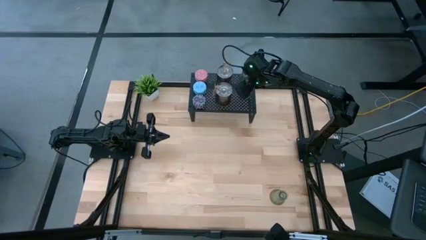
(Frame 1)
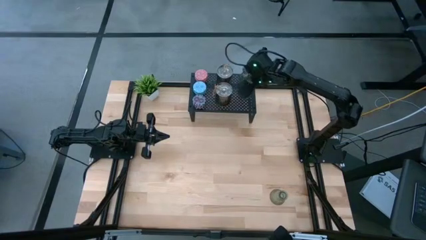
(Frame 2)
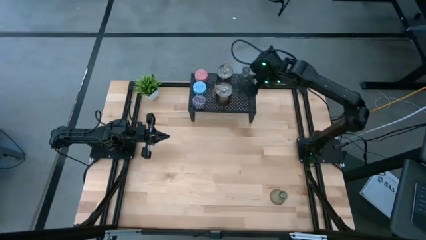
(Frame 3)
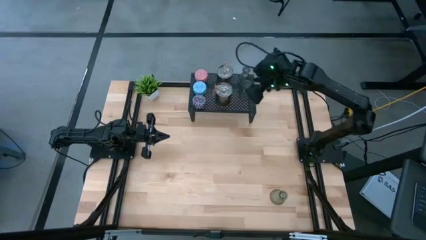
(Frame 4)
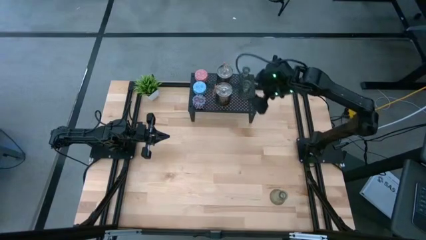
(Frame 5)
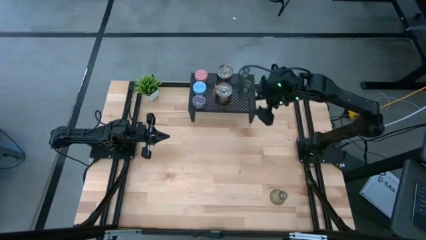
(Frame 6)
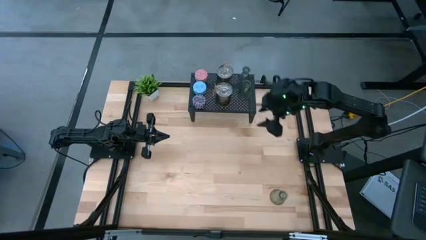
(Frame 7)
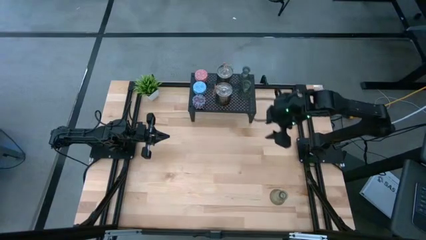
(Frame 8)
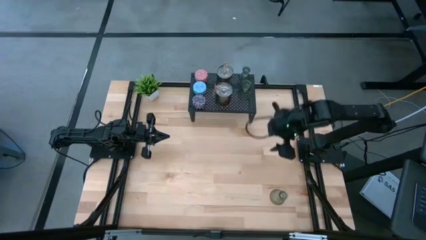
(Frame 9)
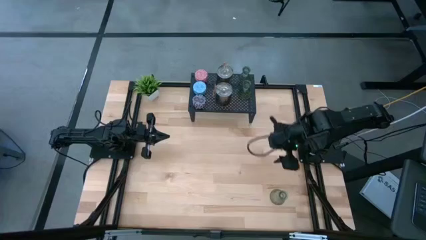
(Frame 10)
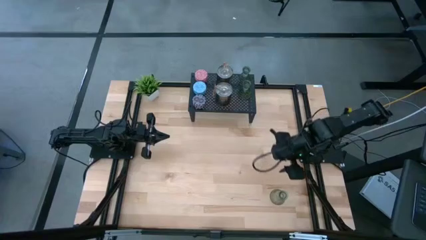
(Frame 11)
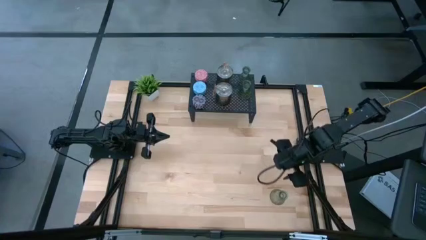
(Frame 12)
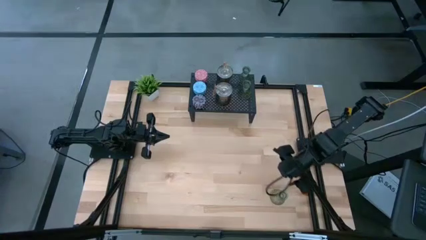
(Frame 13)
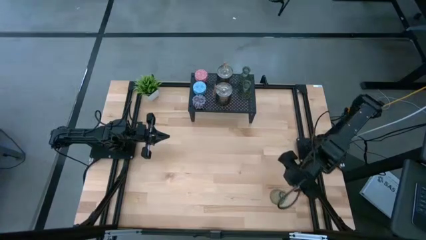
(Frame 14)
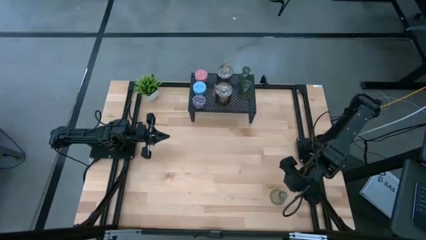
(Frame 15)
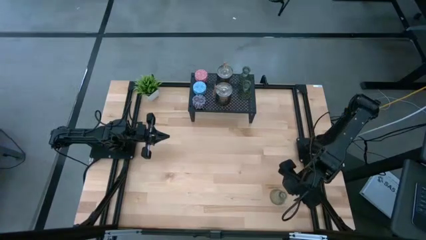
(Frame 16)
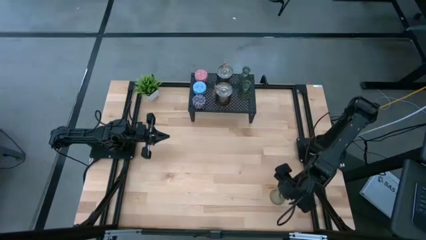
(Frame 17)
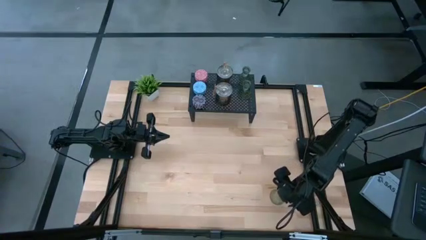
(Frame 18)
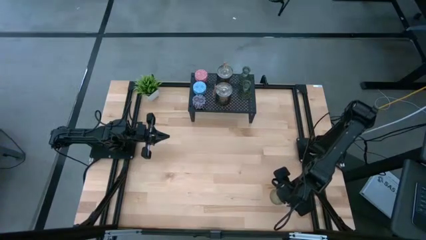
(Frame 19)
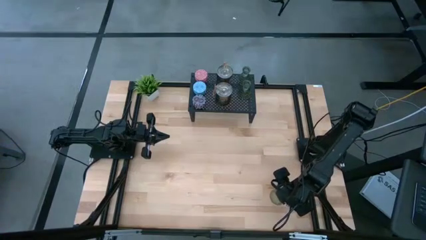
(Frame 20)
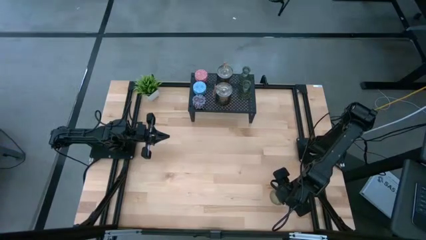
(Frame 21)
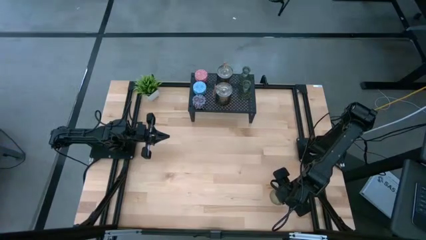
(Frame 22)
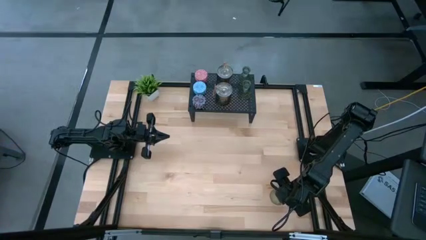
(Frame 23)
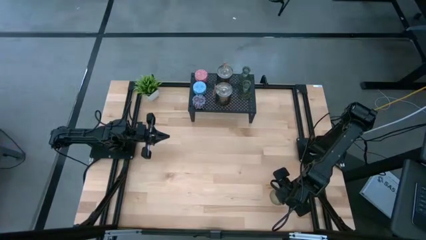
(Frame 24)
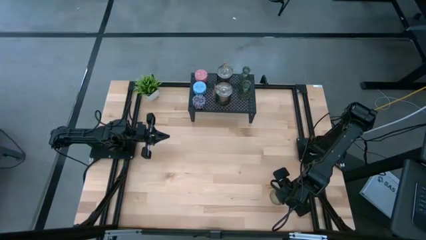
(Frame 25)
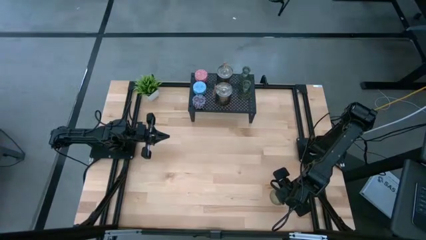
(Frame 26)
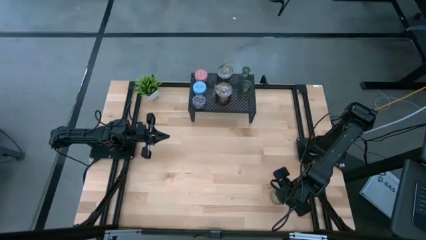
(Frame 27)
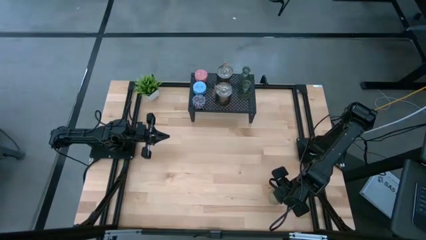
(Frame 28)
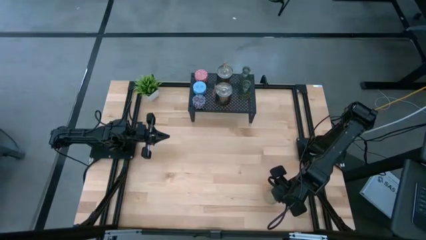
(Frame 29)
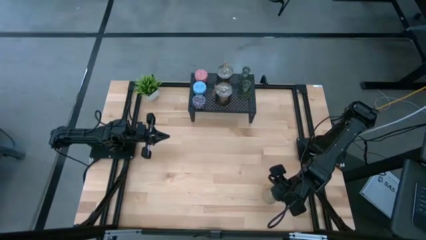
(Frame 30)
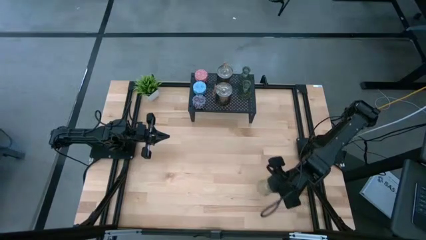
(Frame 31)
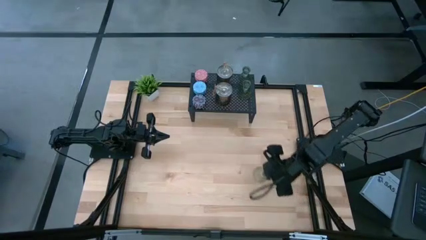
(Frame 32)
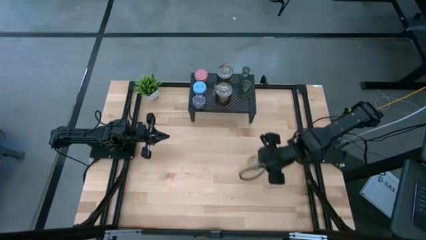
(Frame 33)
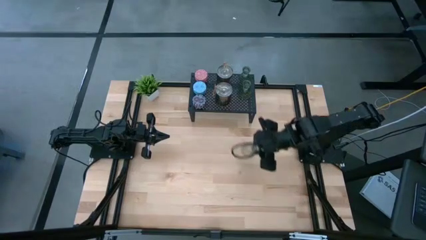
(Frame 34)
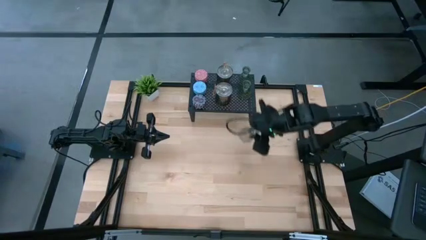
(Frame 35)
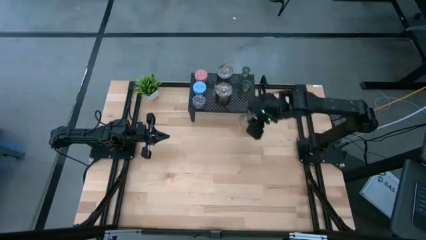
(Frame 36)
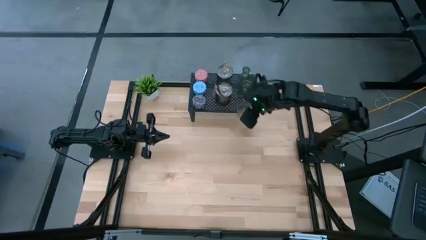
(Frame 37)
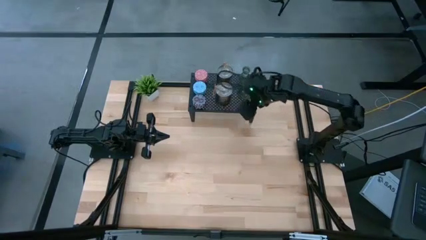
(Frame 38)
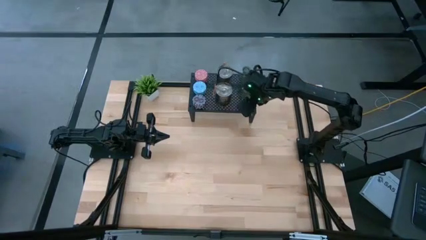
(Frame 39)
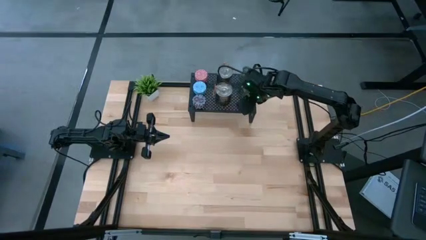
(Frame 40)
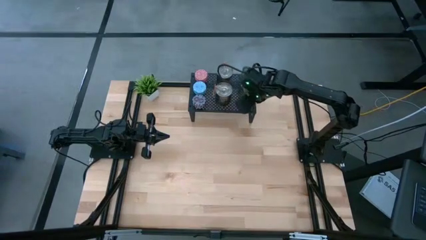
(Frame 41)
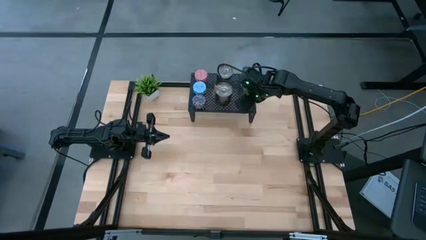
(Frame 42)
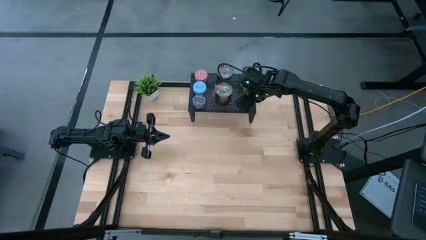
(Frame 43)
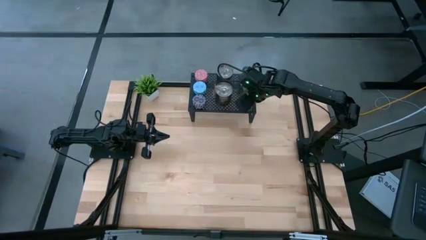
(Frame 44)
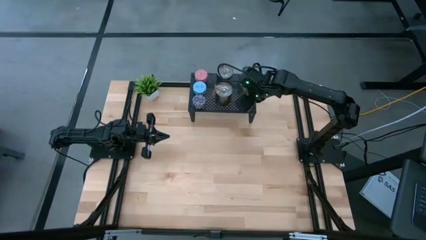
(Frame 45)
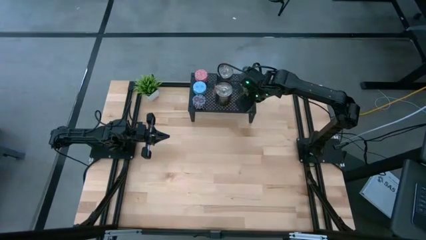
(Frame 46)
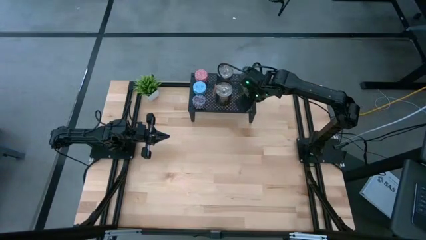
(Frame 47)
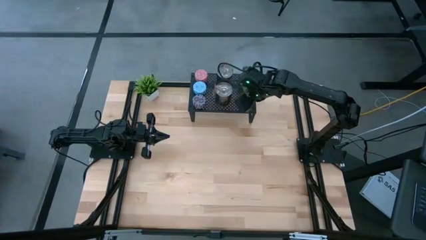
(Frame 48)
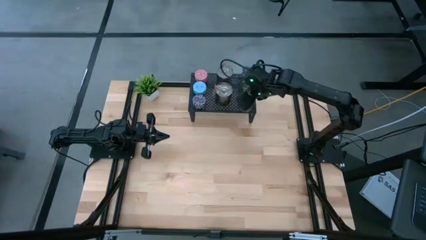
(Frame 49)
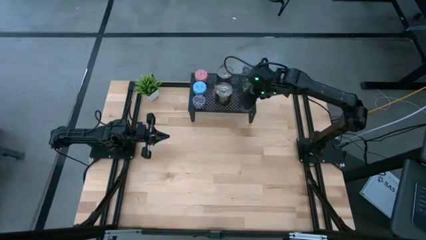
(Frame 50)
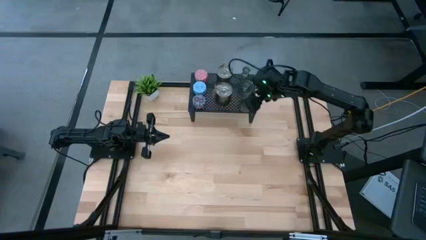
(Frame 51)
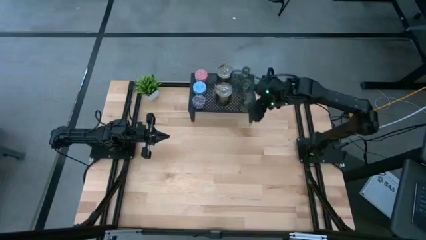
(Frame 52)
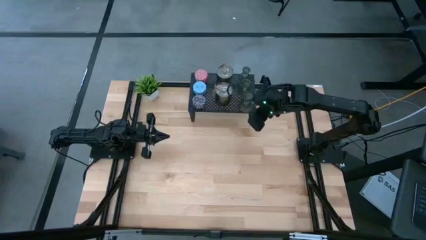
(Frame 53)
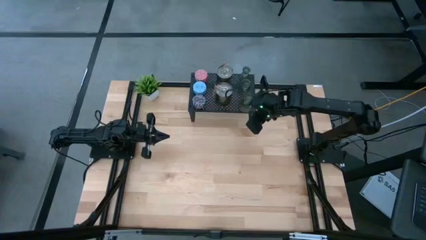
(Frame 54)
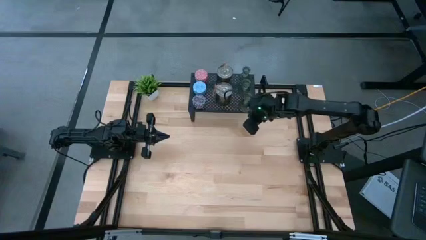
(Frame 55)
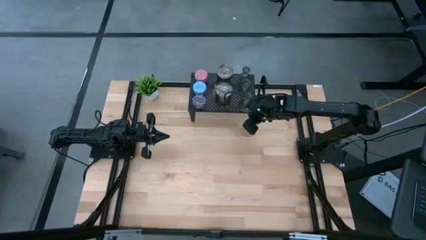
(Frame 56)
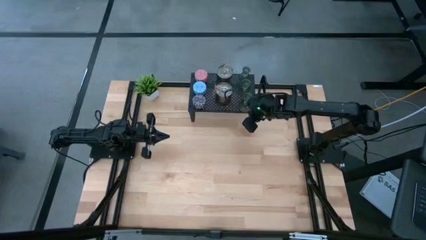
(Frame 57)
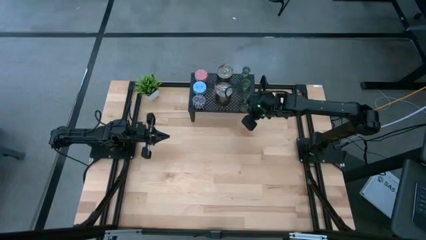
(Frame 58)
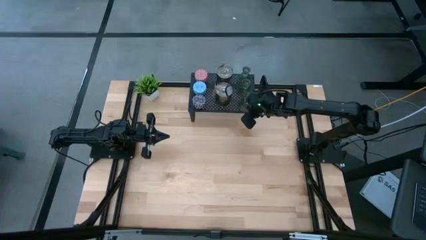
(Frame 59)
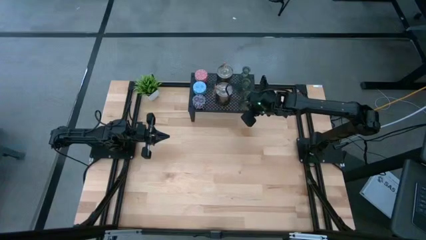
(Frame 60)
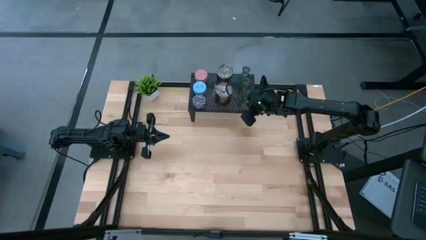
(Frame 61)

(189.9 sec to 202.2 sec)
Task: Pick & Place candle stick holders
Put the green candle holder on the shelf

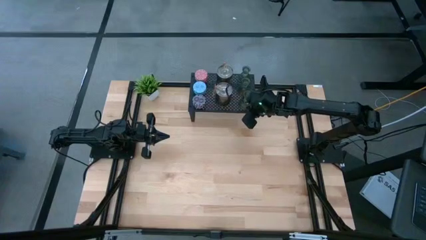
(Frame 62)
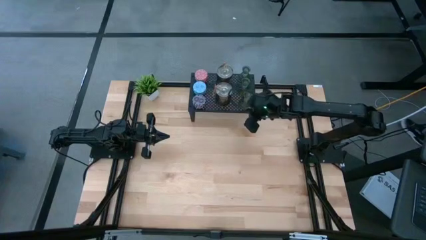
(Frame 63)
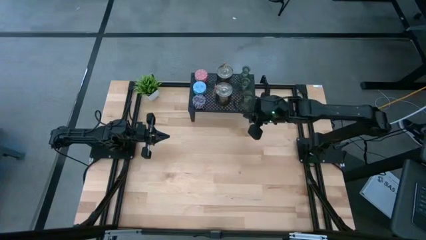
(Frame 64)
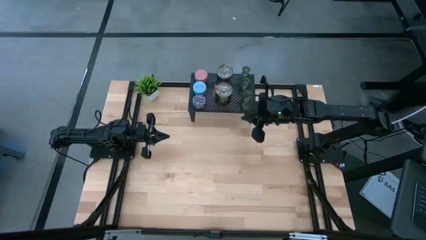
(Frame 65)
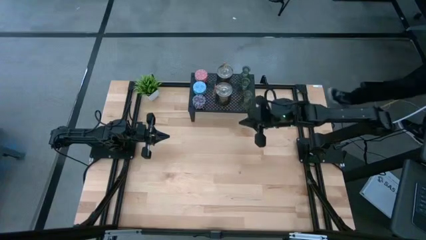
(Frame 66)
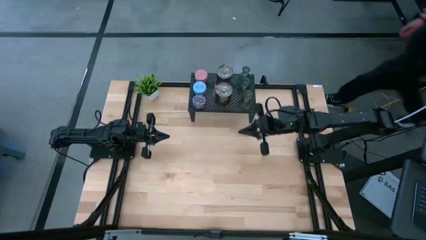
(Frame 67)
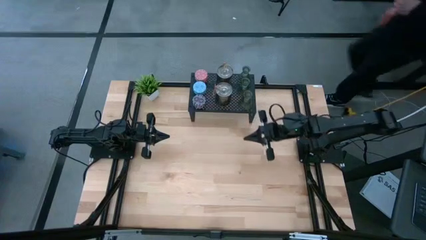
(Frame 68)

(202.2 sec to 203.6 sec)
Return to Home Position
